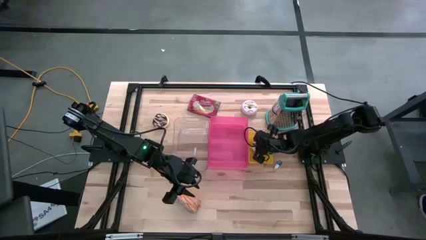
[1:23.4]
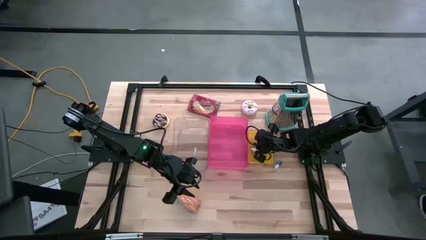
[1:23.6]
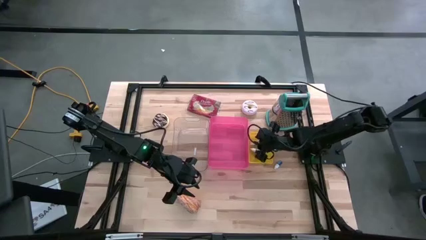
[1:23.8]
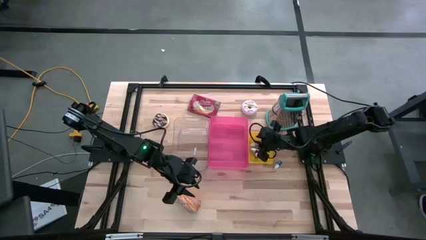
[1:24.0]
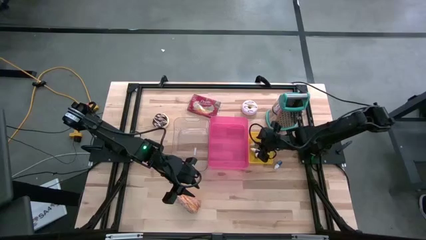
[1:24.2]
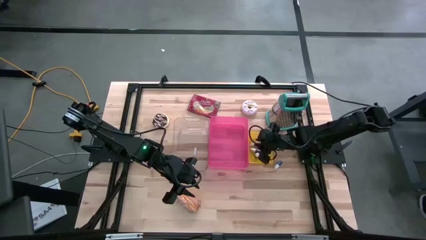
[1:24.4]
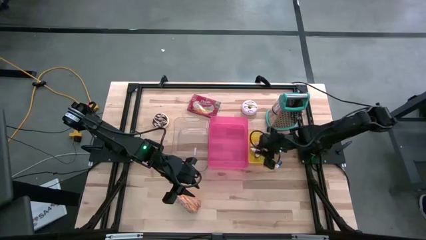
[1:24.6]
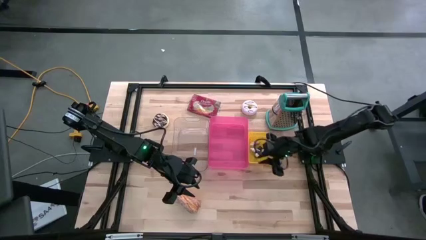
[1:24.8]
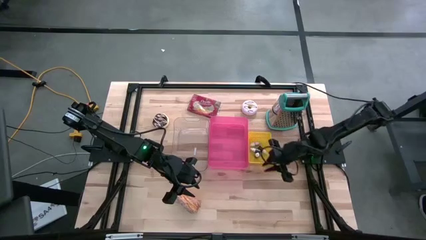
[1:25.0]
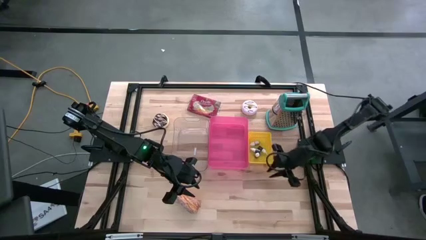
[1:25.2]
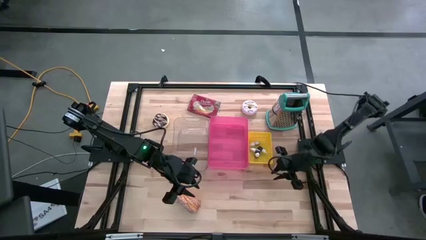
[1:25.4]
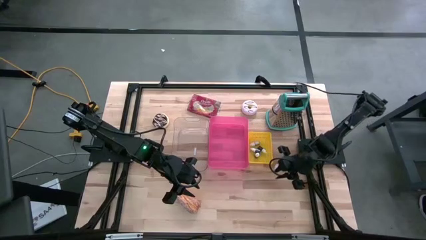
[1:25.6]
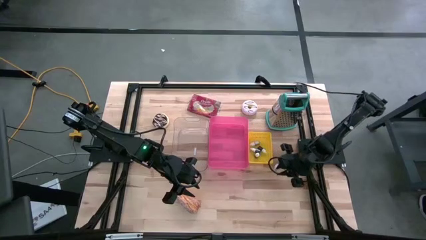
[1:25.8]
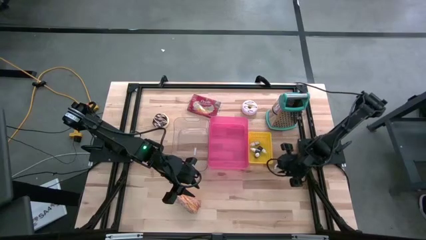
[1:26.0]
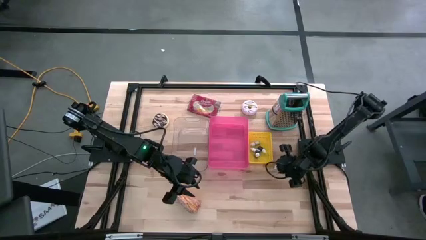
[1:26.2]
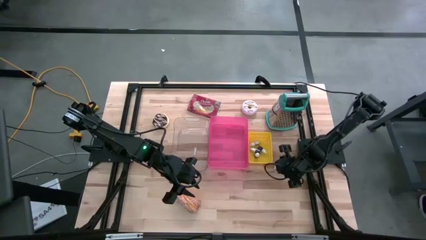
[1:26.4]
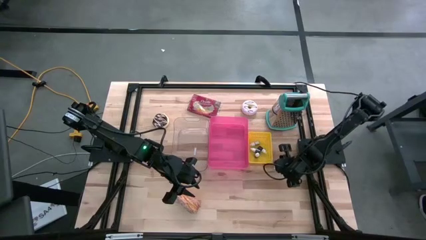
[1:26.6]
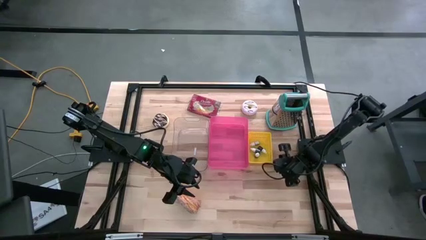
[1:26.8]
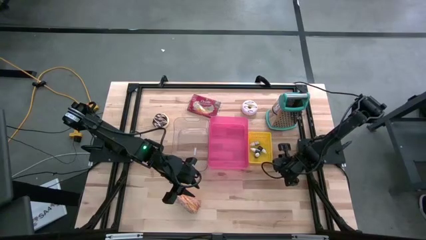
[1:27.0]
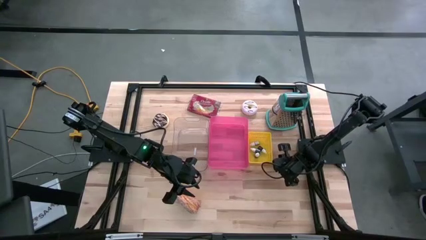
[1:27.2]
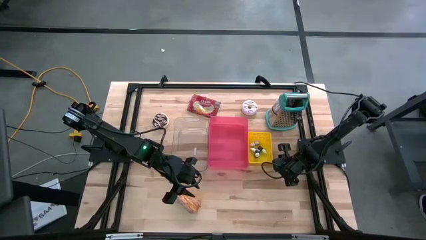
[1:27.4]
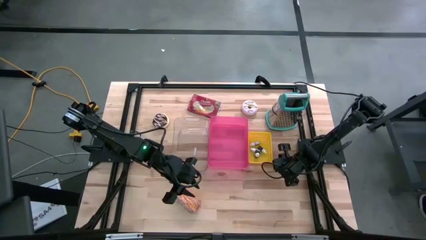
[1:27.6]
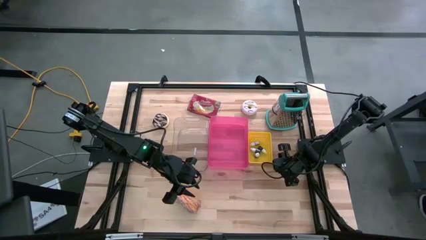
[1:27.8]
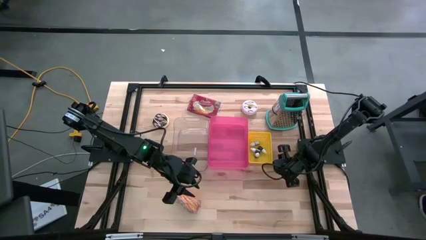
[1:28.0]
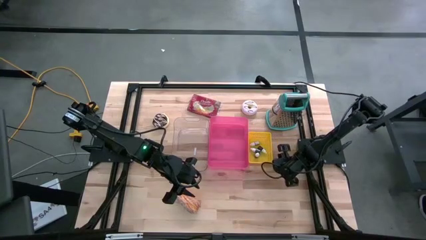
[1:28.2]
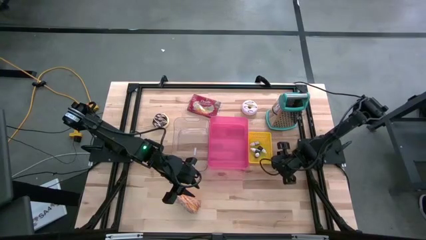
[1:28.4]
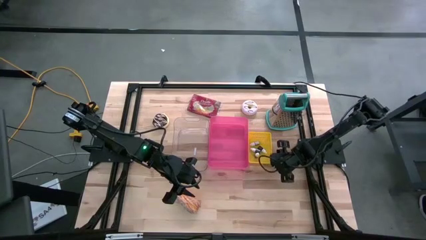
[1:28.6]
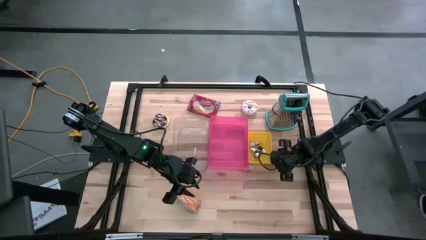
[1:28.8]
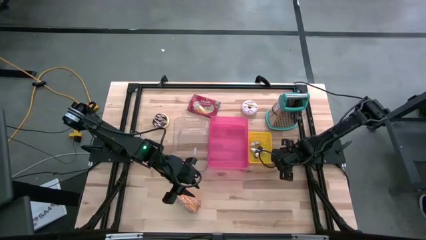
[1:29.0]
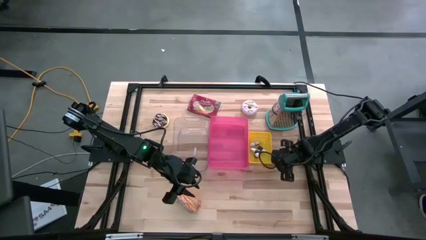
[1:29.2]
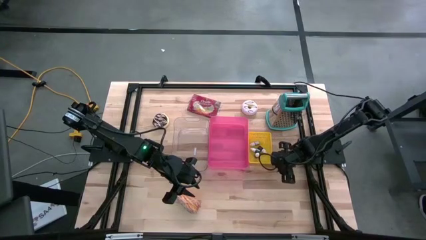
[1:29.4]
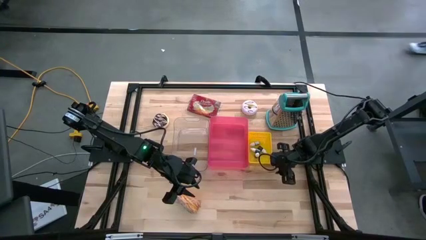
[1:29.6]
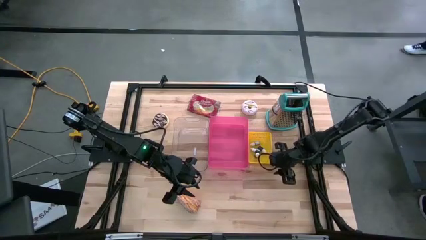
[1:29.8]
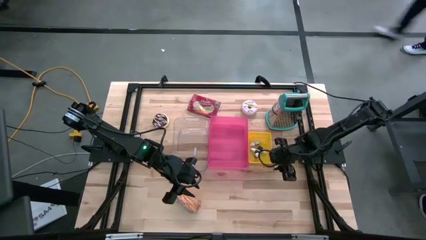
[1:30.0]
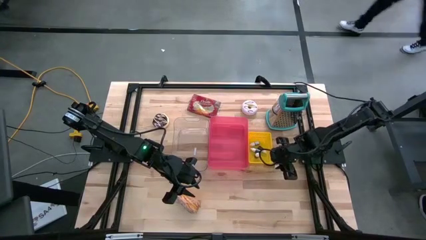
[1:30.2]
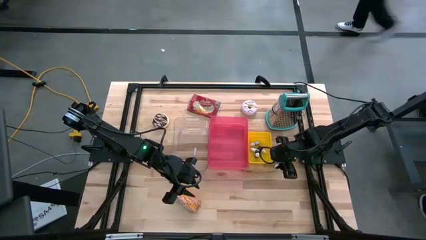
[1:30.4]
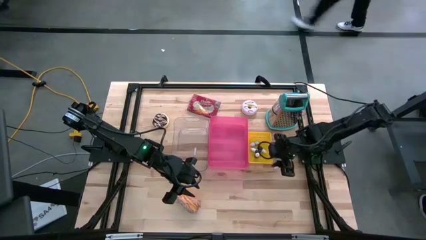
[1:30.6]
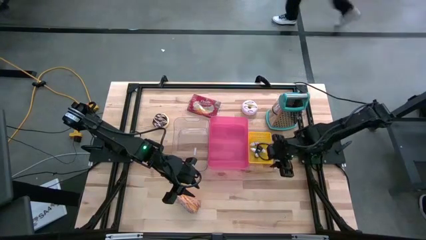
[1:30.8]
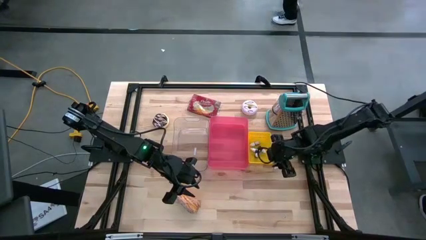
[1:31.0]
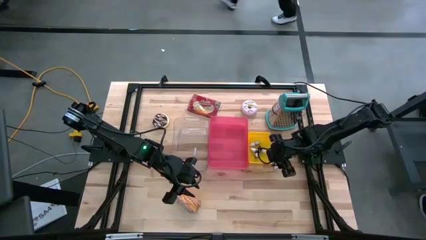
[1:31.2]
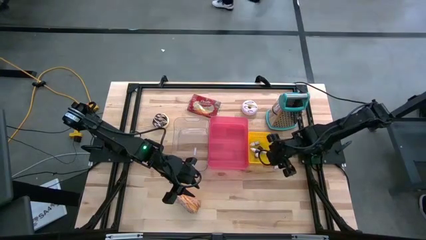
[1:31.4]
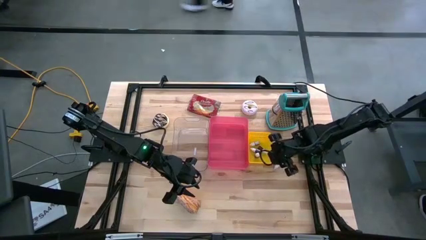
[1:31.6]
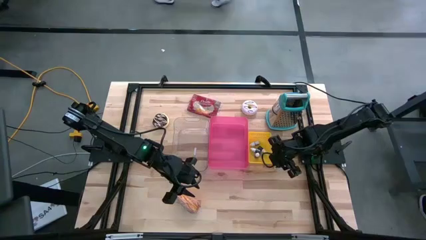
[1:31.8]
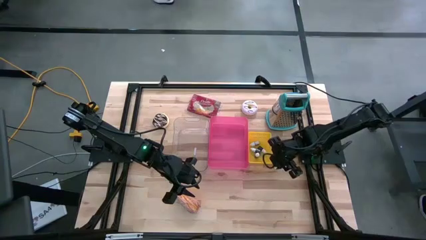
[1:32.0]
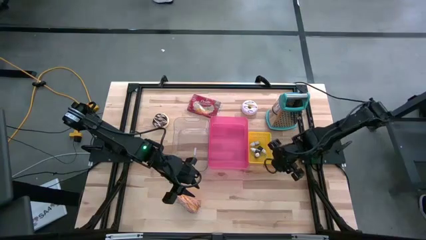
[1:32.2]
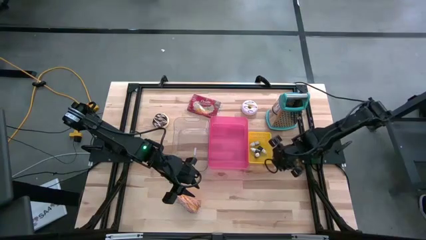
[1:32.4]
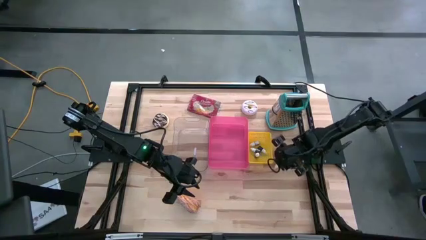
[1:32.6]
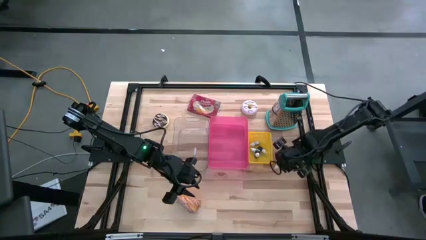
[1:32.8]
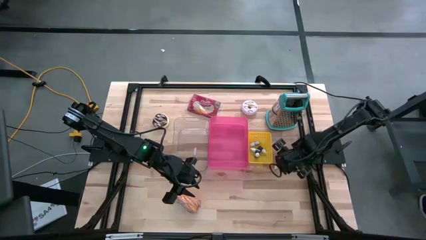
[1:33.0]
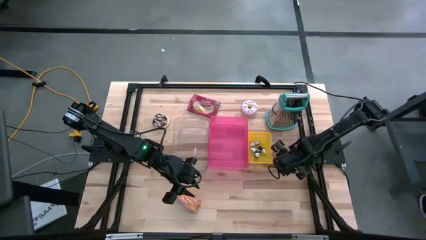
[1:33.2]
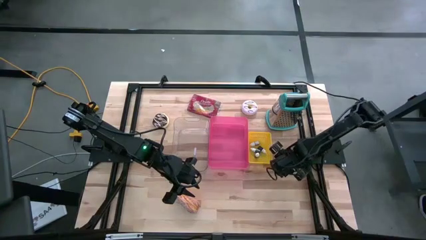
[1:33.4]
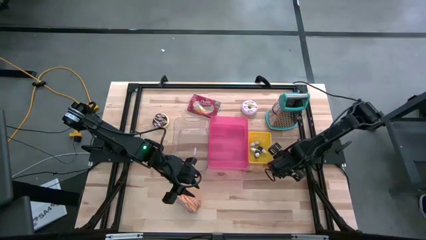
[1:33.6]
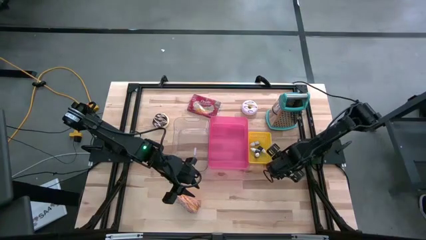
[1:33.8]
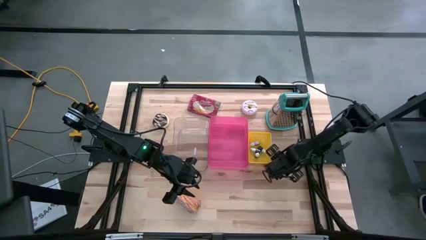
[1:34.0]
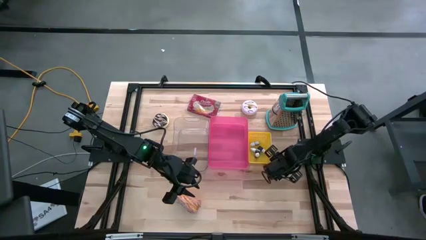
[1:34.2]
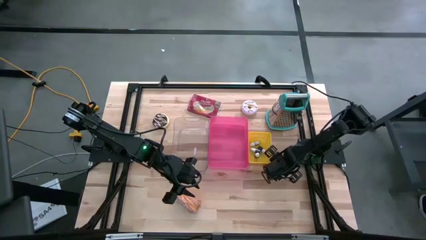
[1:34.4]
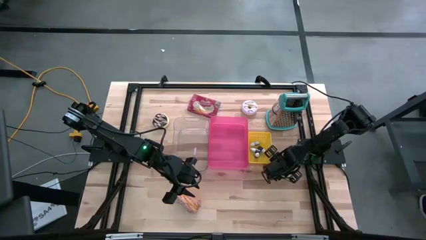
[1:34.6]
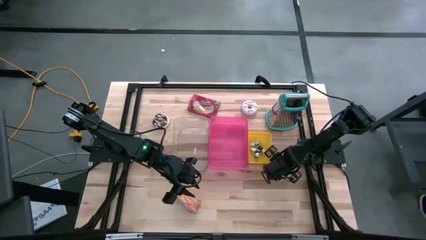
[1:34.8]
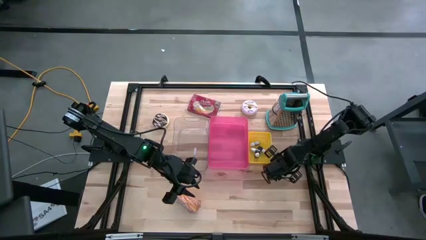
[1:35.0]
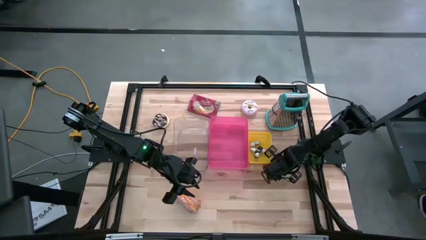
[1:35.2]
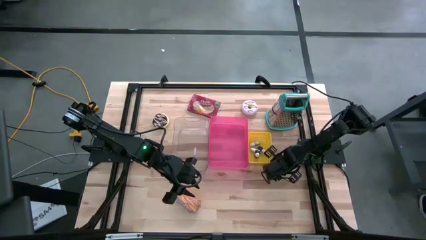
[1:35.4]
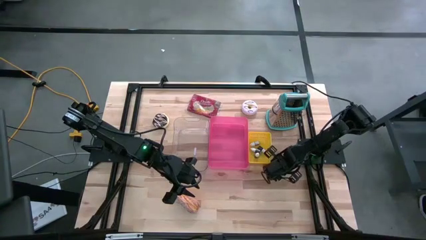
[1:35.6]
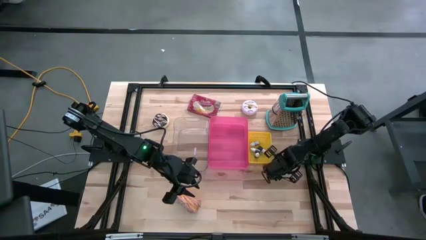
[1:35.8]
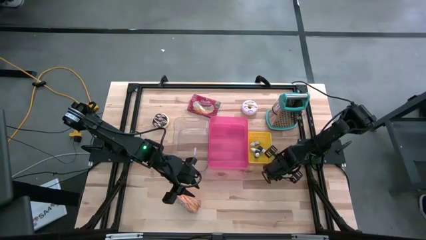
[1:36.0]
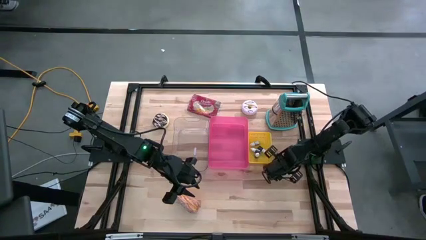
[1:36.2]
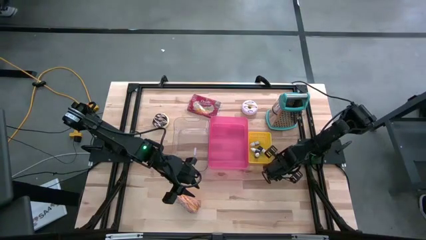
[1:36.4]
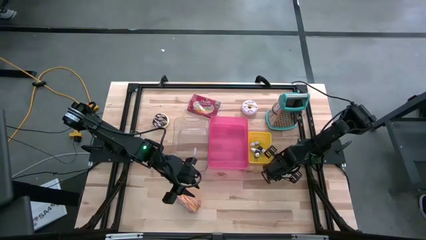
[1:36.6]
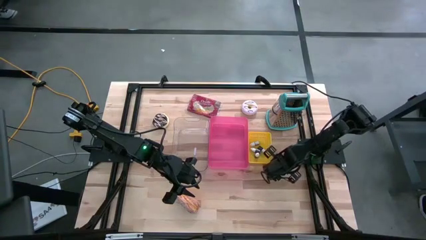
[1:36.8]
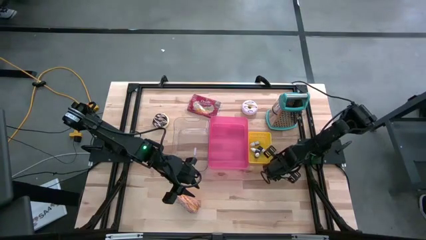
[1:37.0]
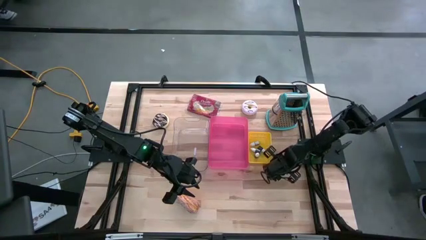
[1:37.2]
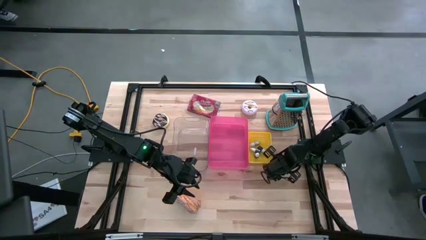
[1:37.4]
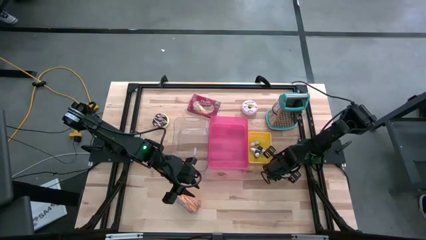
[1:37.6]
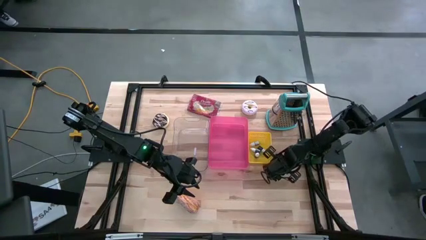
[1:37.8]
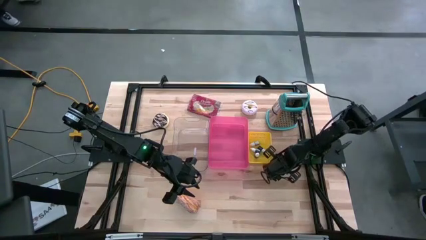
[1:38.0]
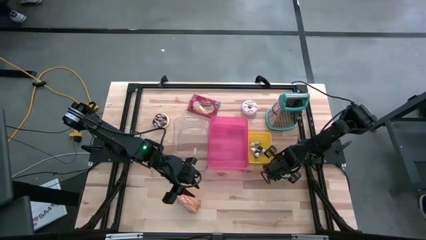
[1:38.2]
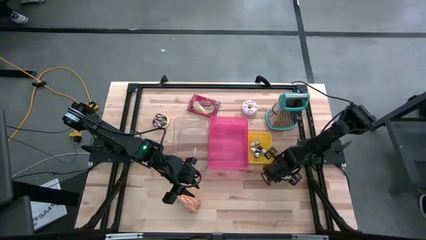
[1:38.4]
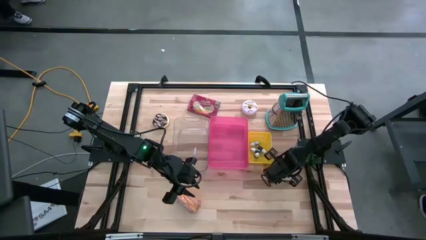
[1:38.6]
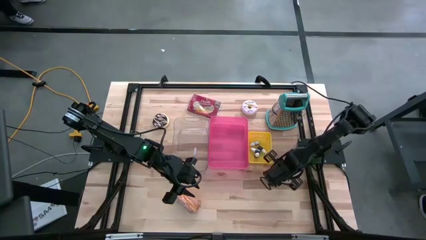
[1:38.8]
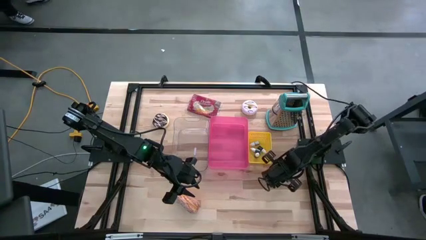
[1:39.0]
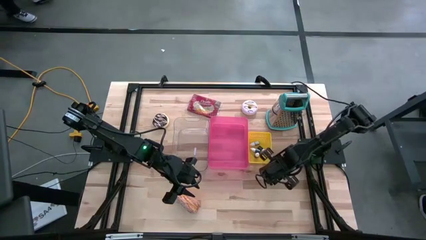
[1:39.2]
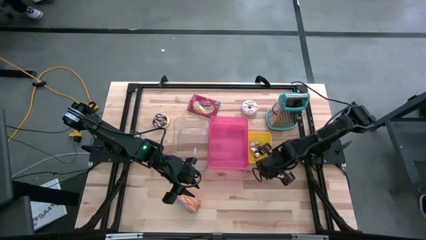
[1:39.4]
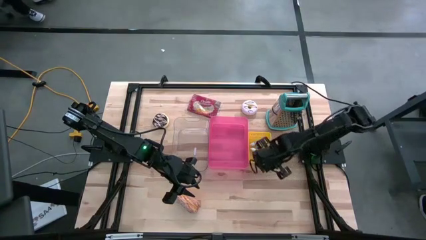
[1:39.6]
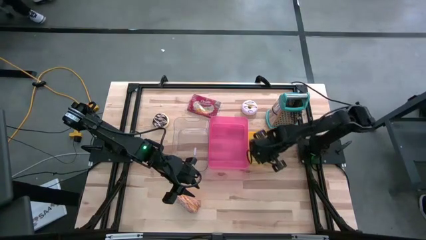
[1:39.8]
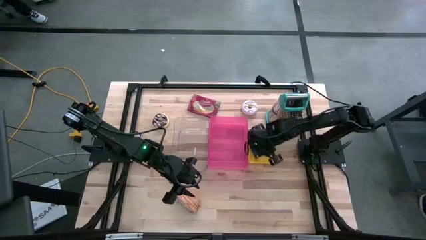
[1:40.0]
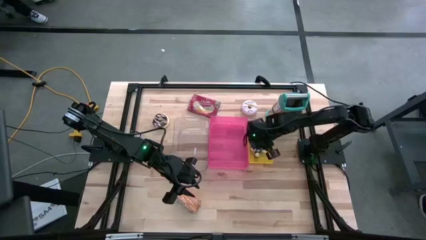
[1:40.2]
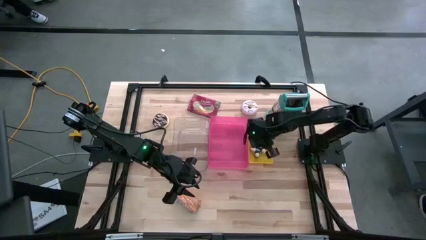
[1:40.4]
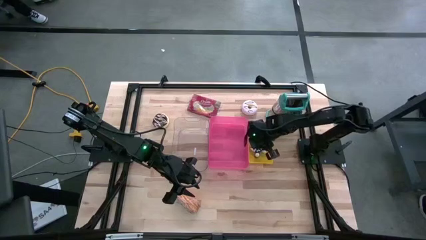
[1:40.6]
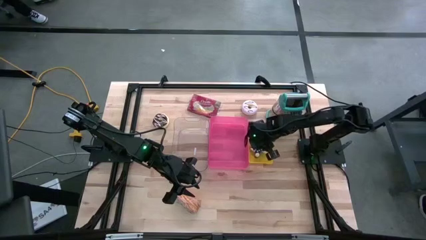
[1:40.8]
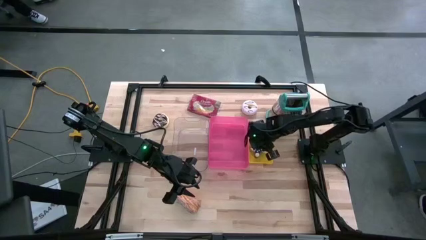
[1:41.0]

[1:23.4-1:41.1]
Put the blue food coloring bottle into the yellow bin
